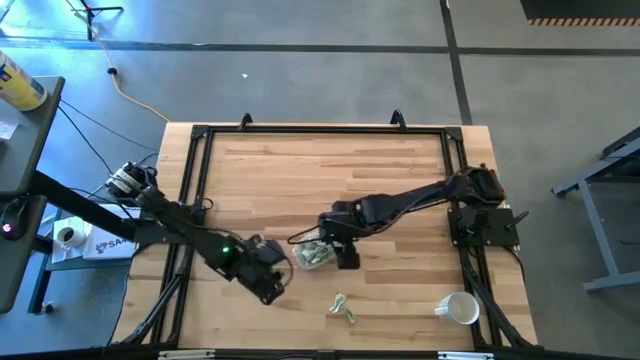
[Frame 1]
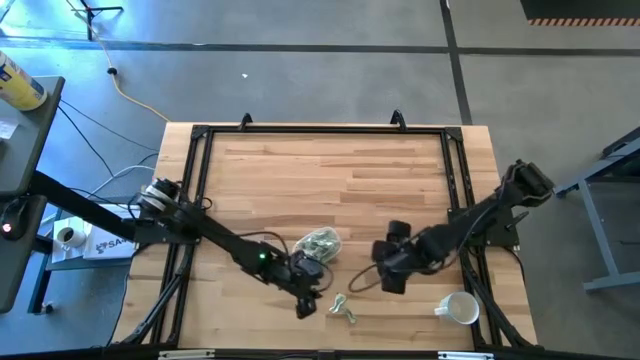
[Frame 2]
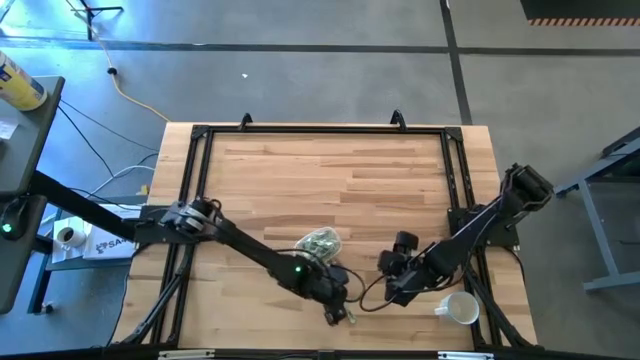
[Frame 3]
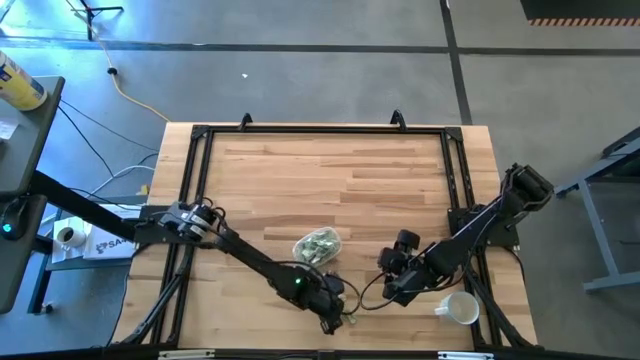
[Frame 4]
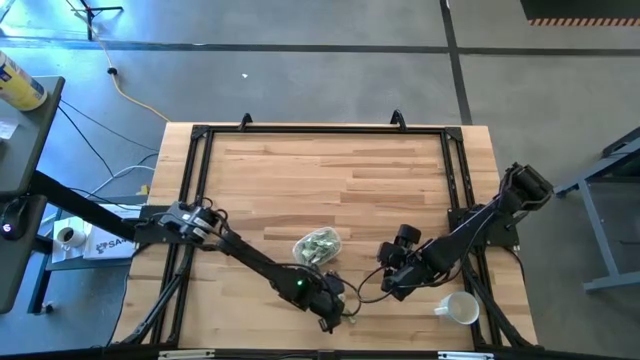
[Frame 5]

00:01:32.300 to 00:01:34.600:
Task: Pick and place Stevia / Truvia into bins
Put the green stevia packet into the transparent bin

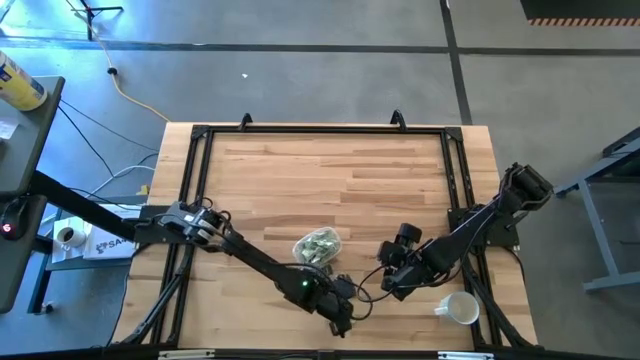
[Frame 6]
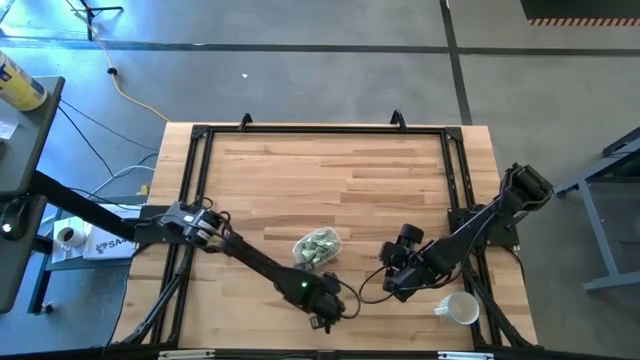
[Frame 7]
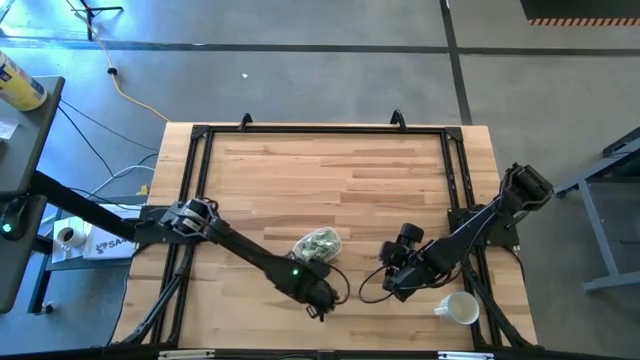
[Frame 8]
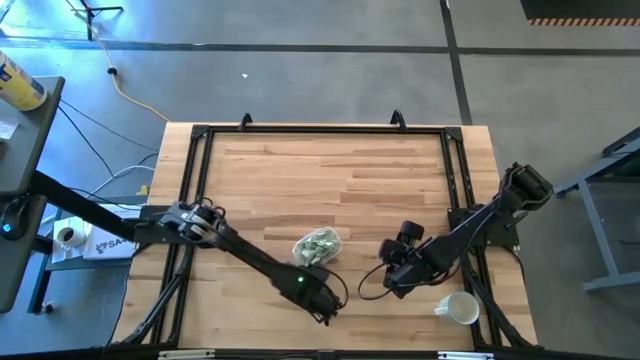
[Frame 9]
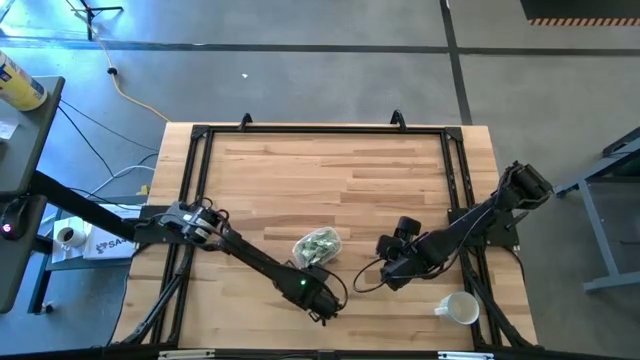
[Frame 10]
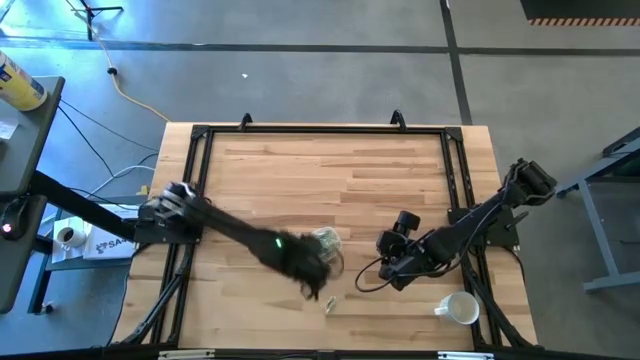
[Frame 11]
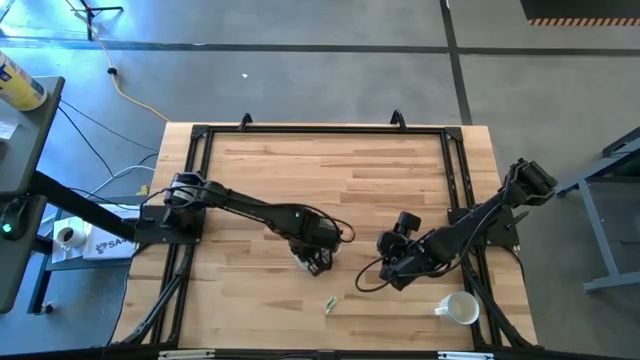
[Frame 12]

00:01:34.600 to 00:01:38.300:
Put the green stevia packet into the transparent bin

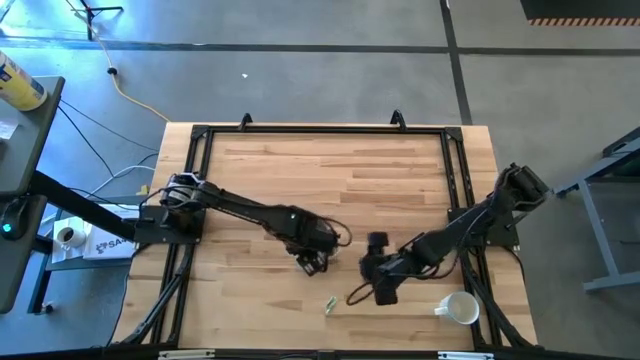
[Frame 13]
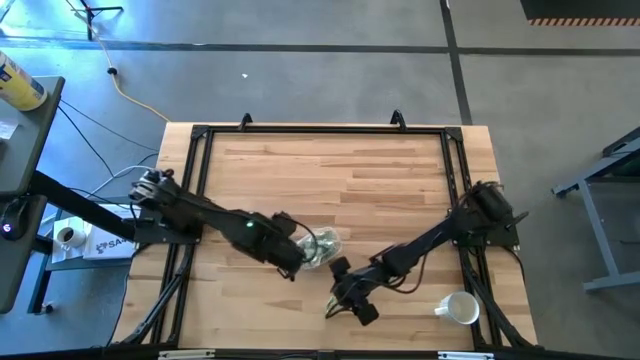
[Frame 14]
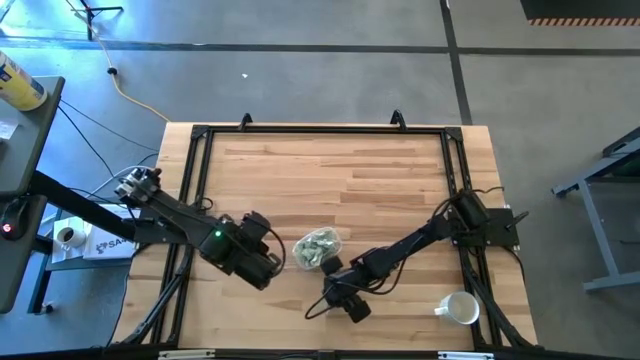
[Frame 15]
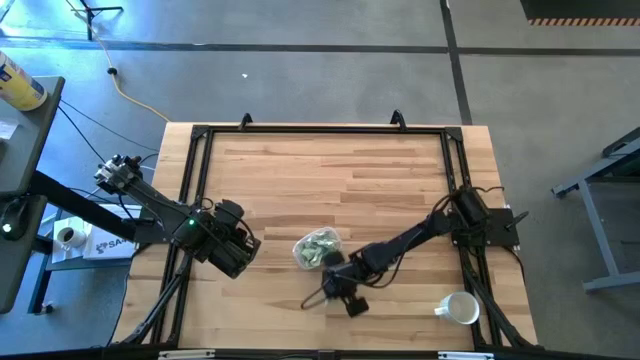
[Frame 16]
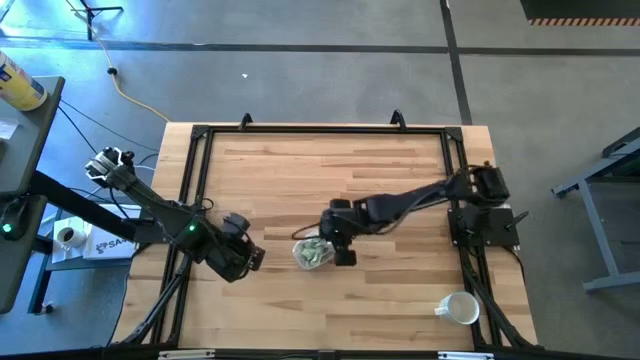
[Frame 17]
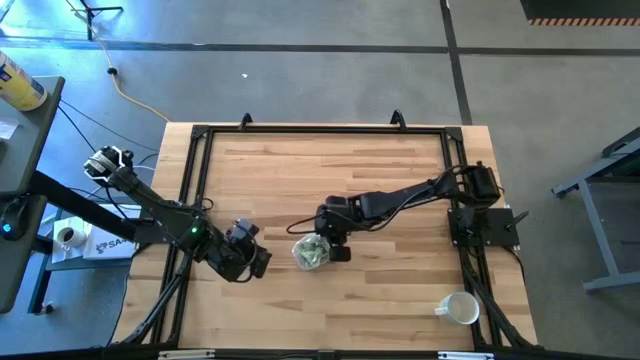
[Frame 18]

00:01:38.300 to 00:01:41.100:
Put the green stevia packet into the transparent bin

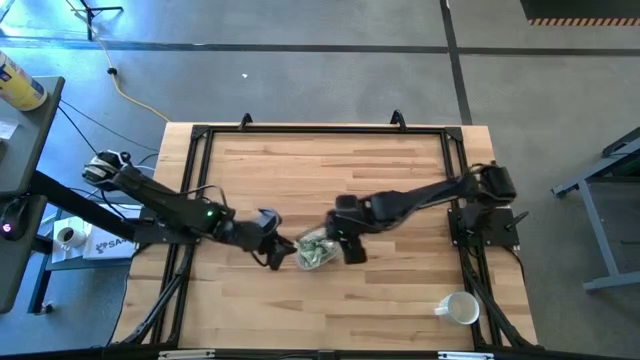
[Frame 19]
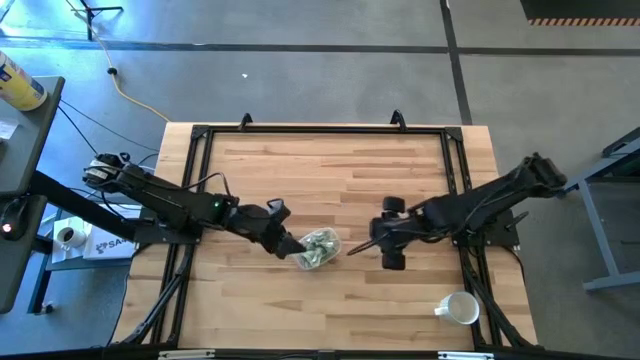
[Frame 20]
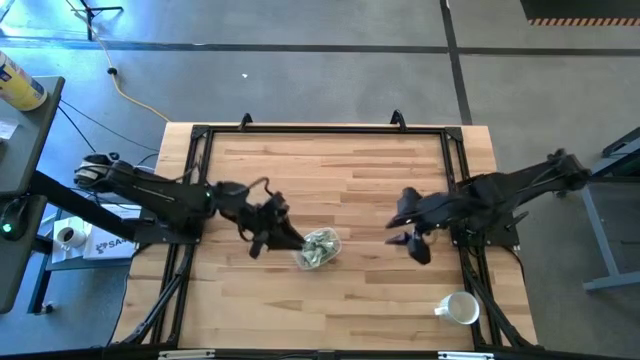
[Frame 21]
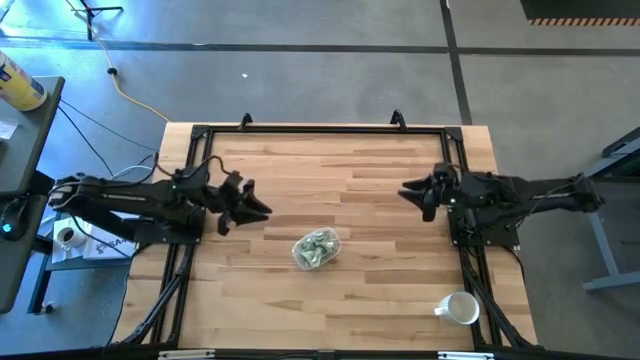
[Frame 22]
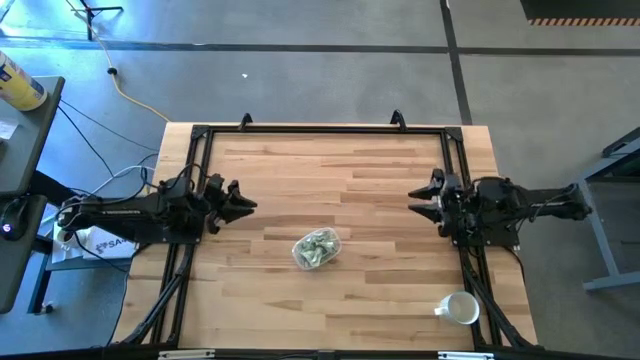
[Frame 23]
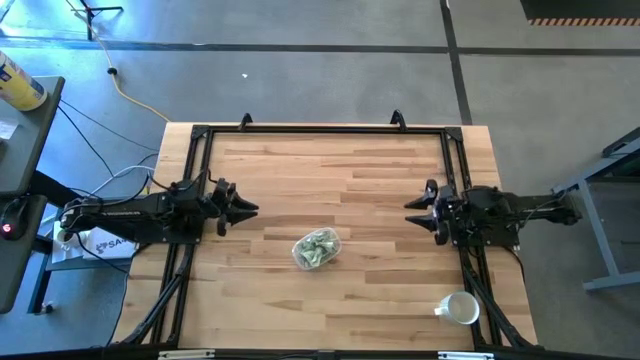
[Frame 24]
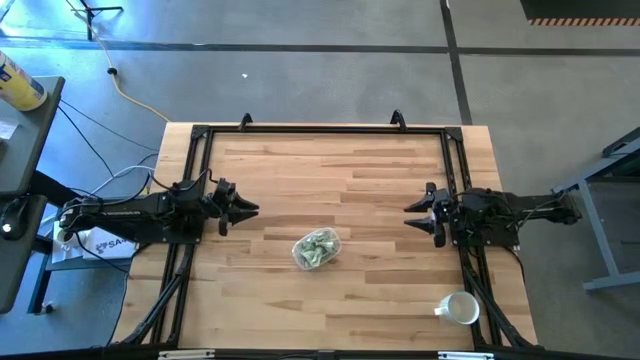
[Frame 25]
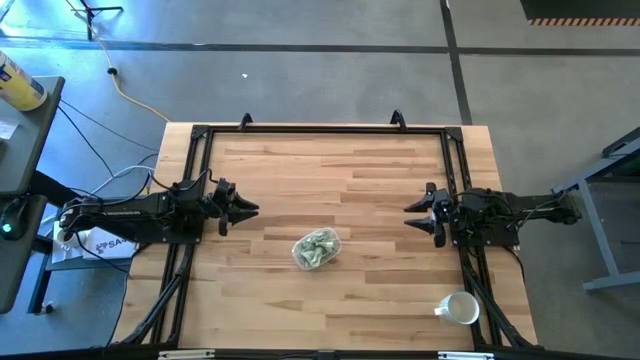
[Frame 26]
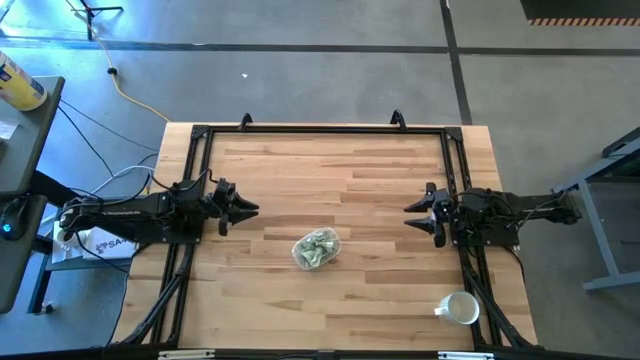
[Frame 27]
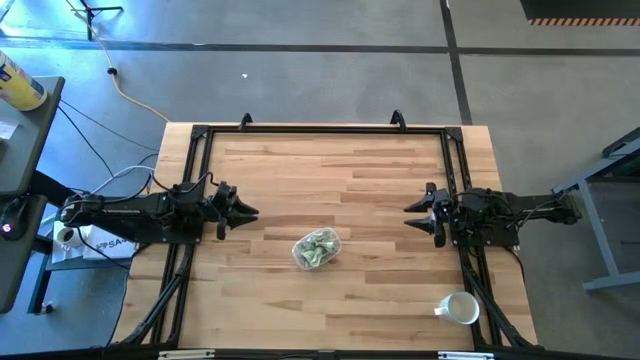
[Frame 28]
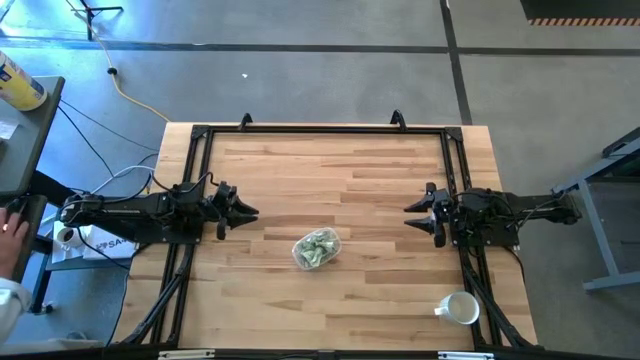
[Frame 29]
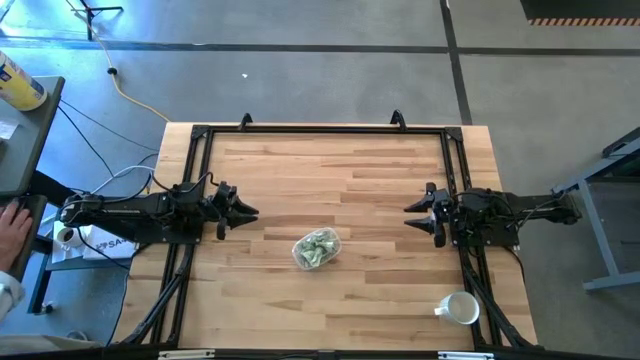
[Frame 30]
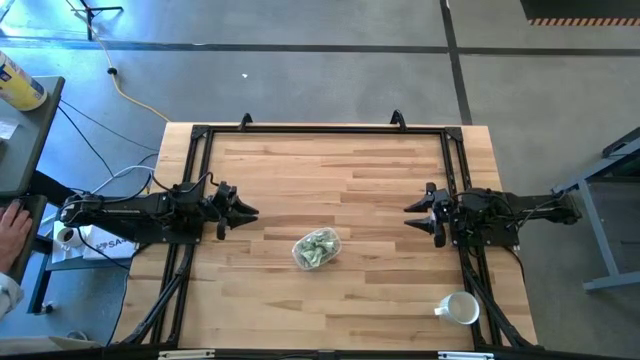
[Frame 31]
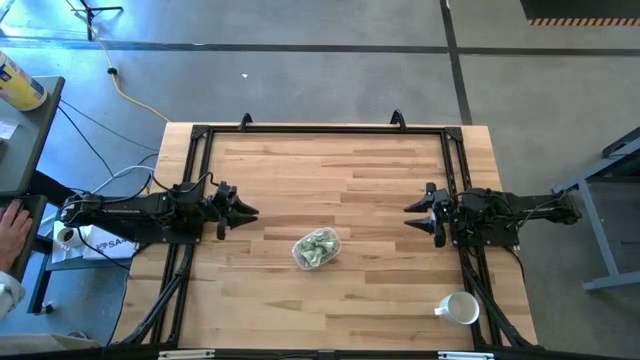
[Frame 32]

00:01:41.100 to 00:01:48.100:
Return to Home Position

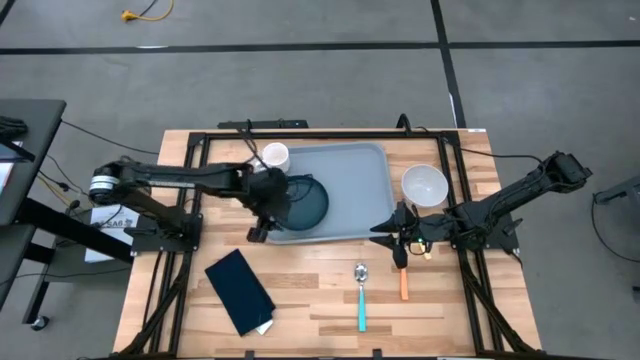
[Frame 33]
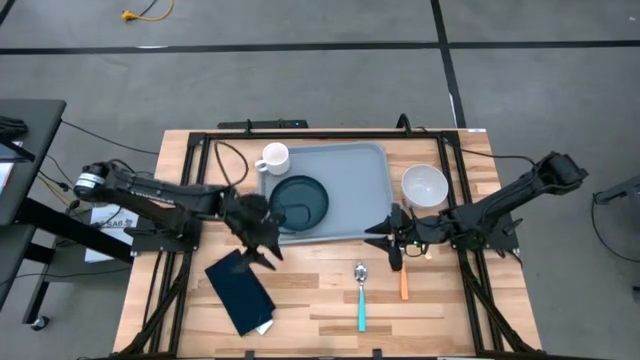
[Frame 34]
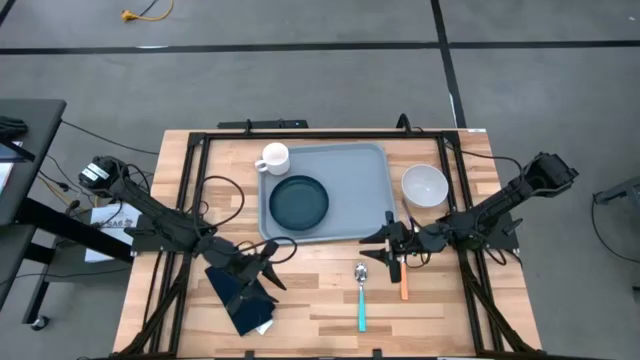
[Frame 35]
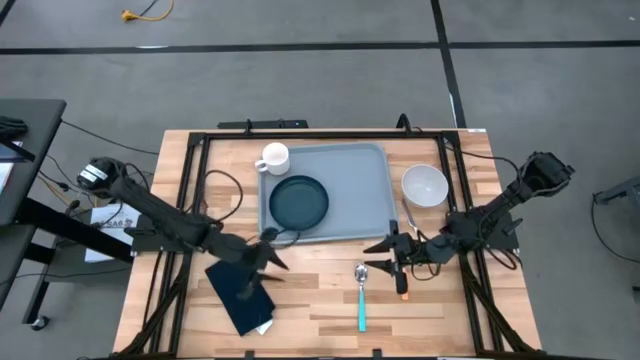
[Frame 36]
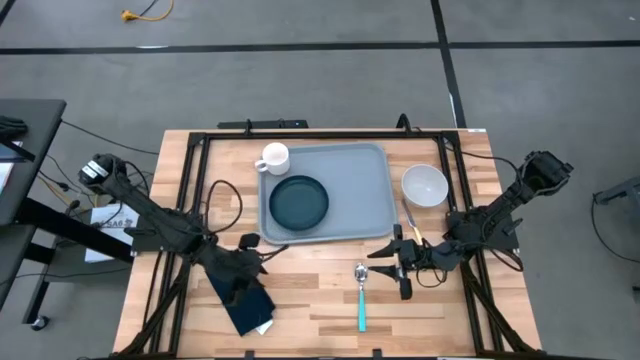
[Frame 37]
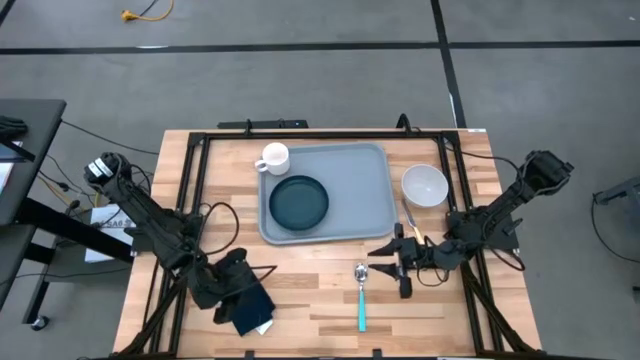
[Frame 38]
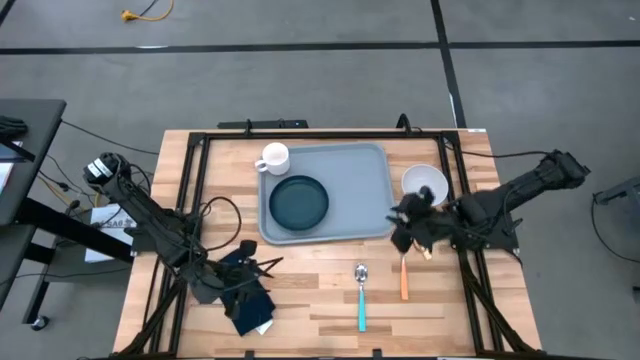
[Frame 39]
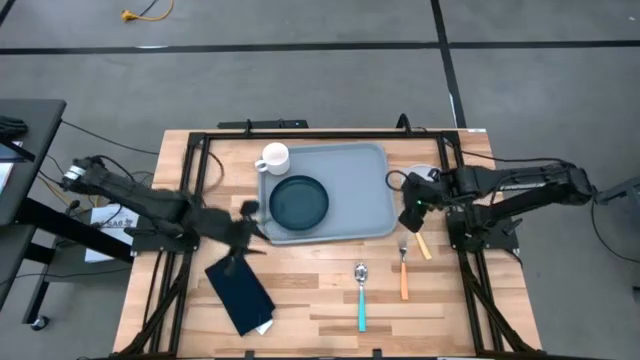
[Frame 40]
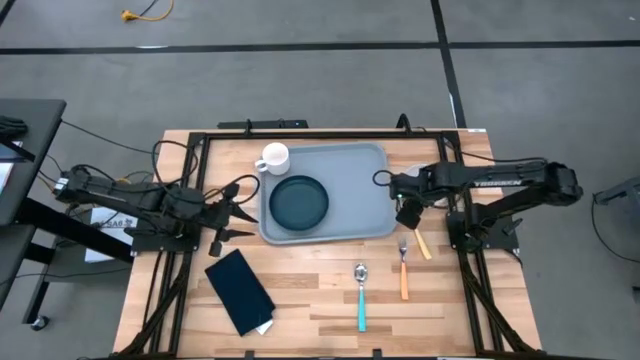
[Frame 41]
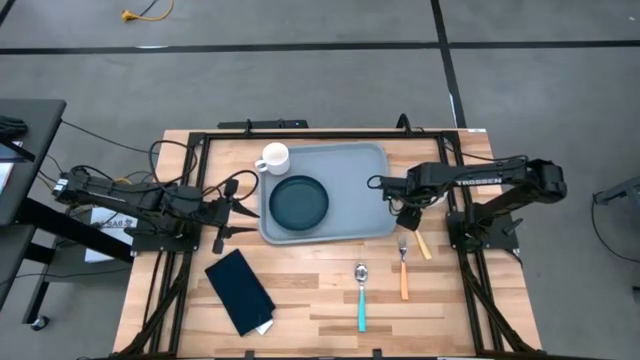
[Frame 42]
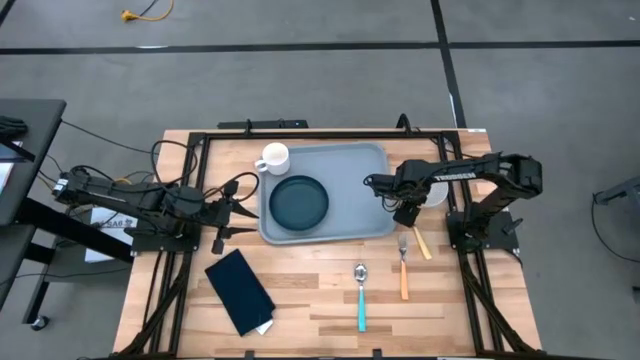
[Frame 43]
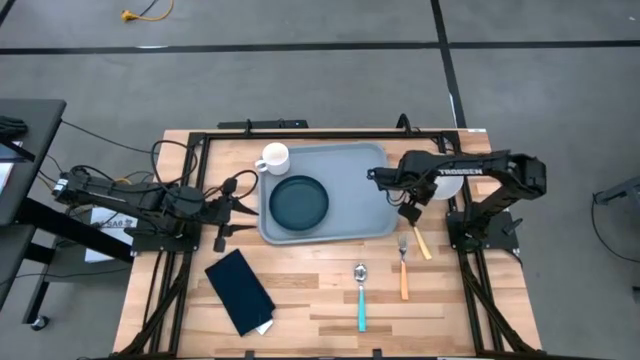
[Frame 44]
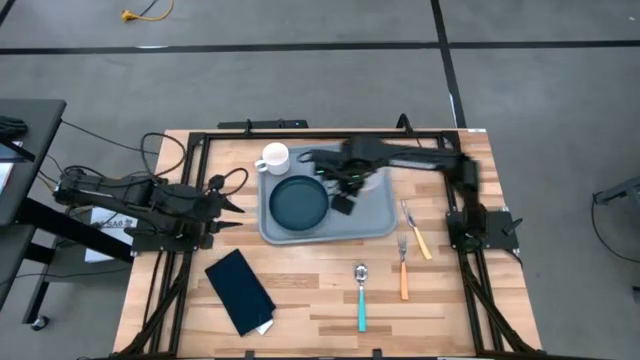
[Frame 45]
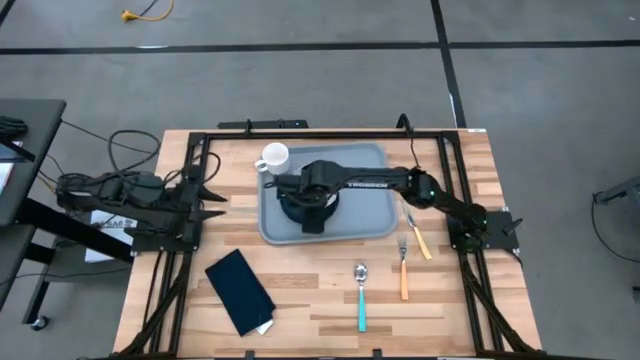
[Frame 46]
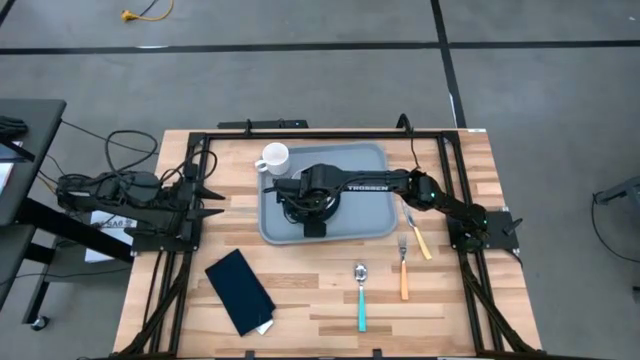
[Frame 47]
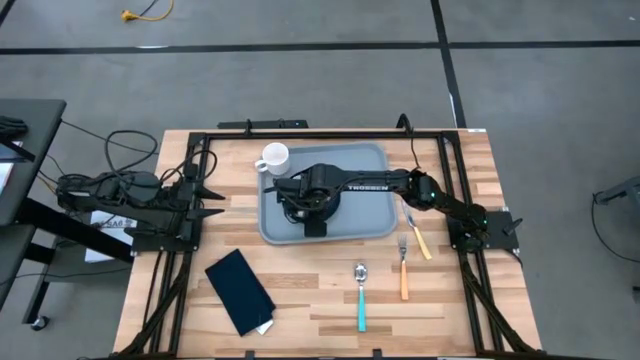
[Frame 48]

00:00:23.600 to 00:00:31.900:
Task: Set up tray
Put the white bowl on the top of the green plate on the gray serving tray
